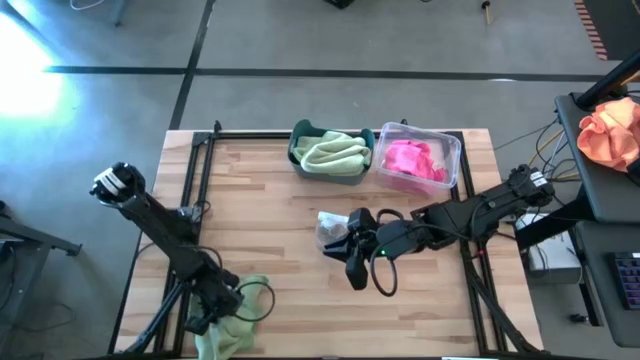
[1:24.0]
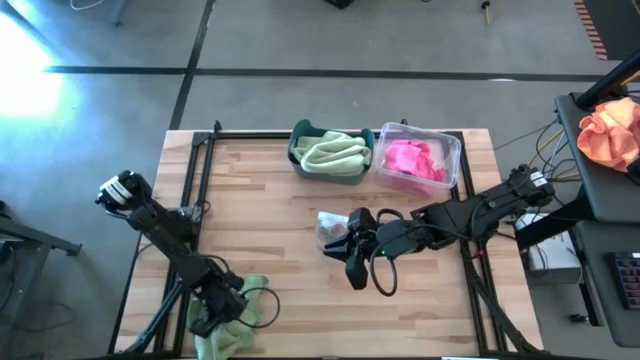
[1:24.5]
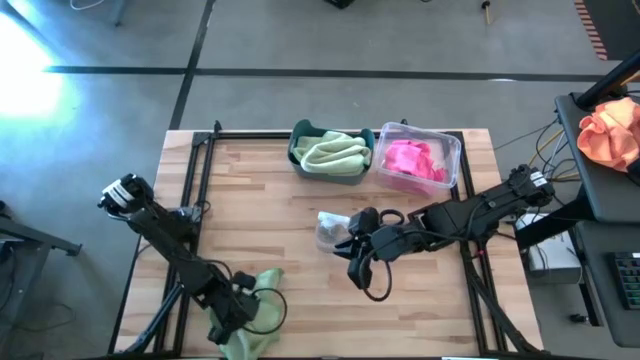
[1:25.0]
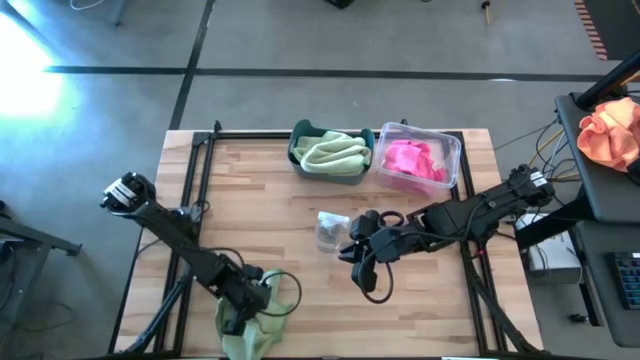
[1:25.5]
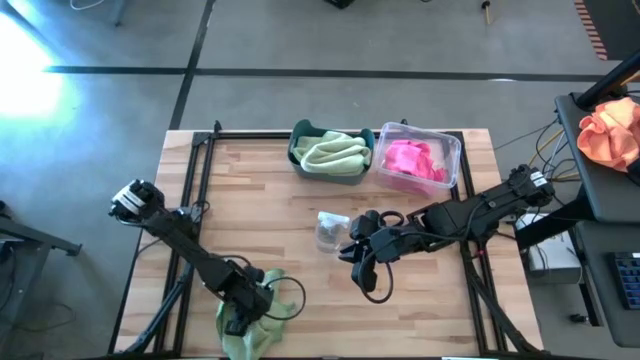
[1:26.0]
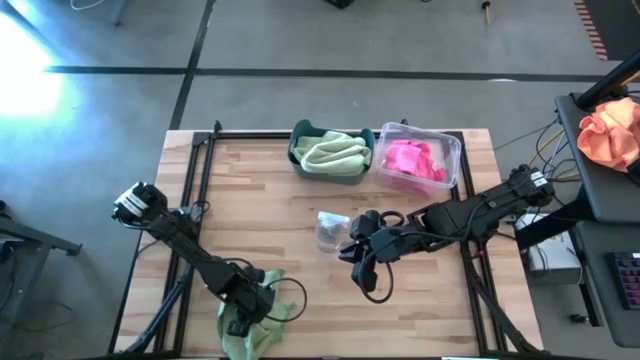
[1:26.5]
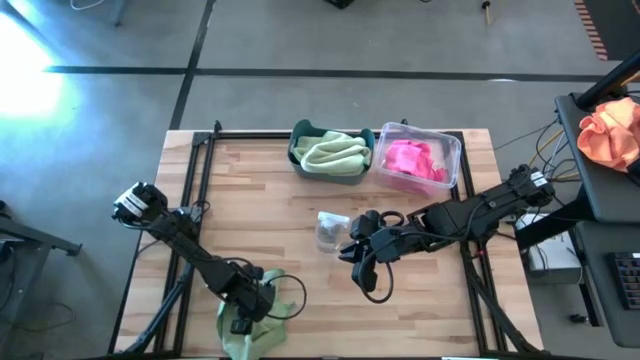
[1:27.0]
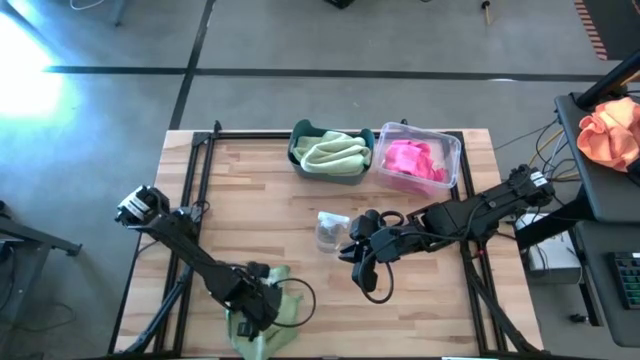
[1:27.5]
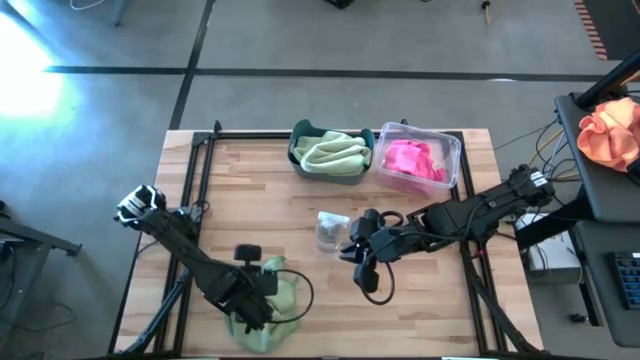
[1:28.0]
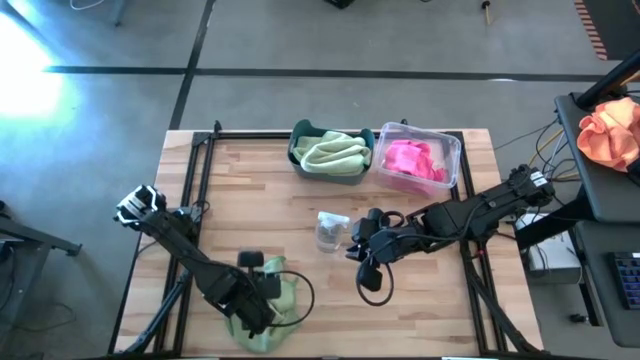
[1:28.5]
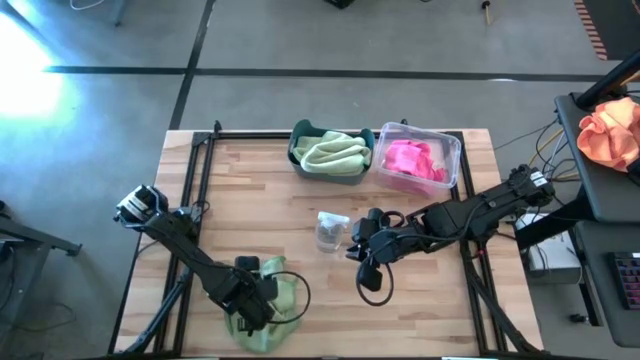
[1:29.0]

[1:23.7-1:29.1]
Task: Sort microfiber towel by color & place in baskets
Put the green microfiber cloth into the blue bin

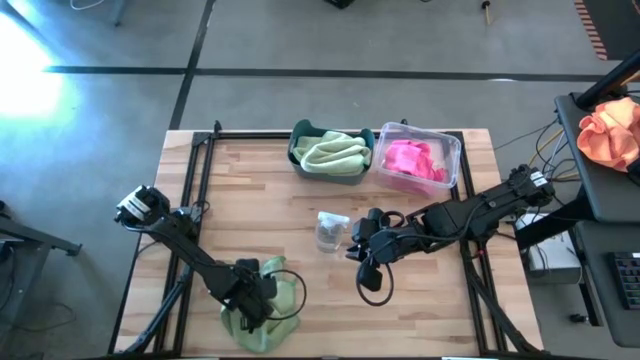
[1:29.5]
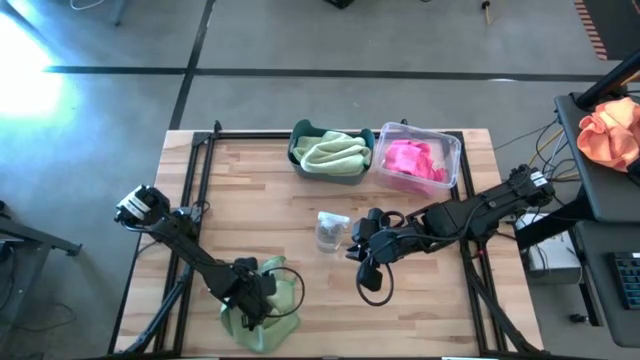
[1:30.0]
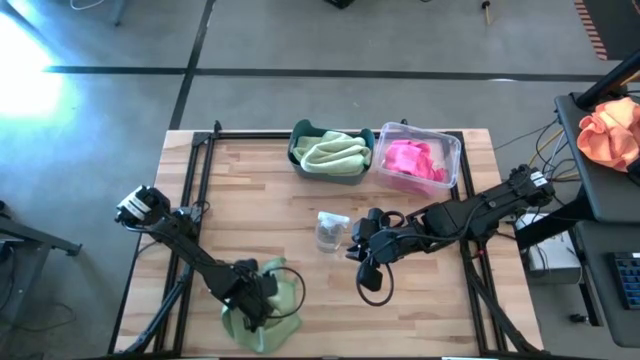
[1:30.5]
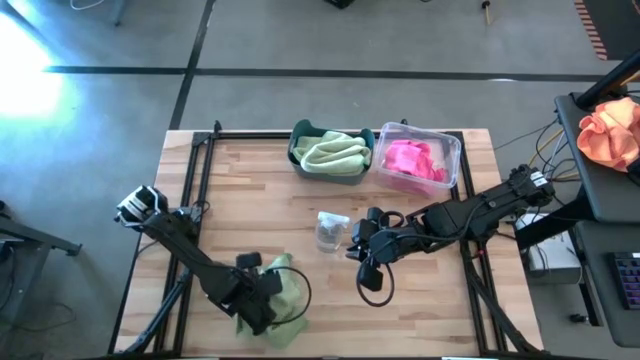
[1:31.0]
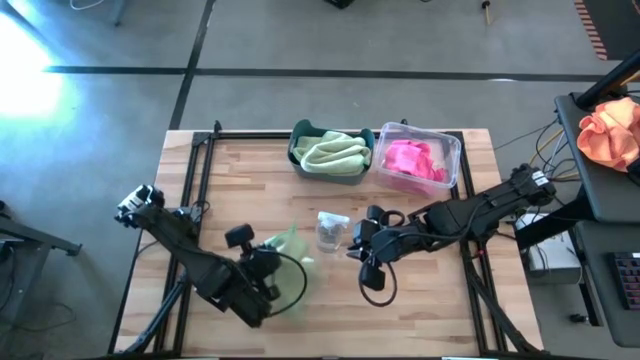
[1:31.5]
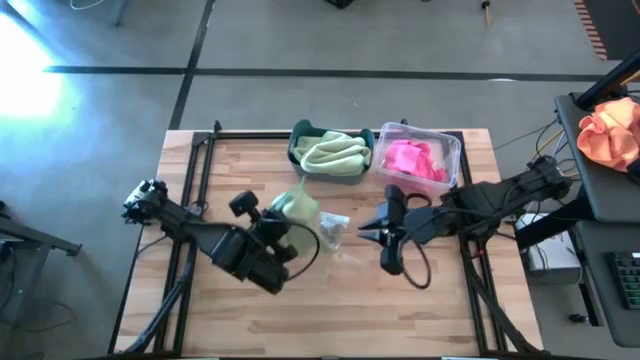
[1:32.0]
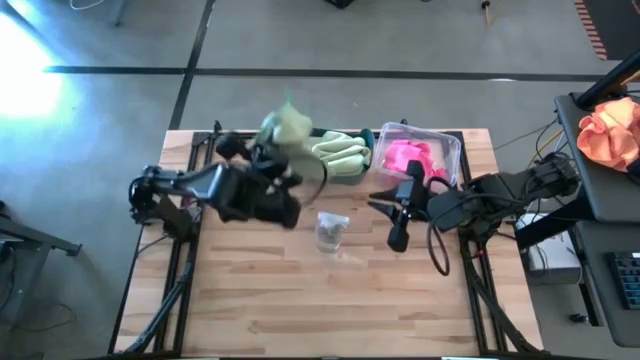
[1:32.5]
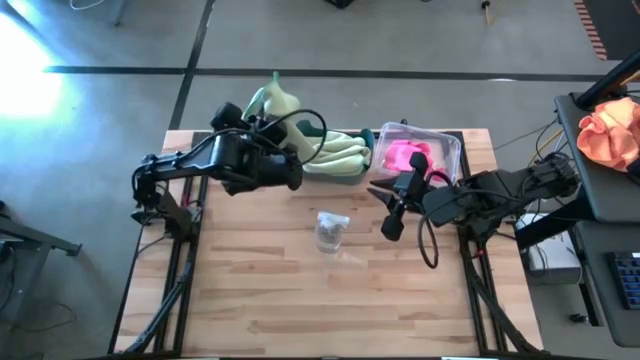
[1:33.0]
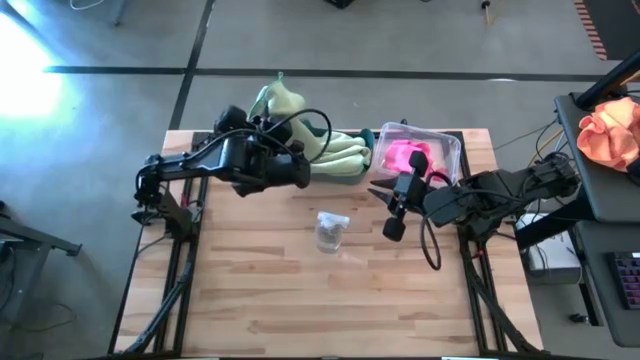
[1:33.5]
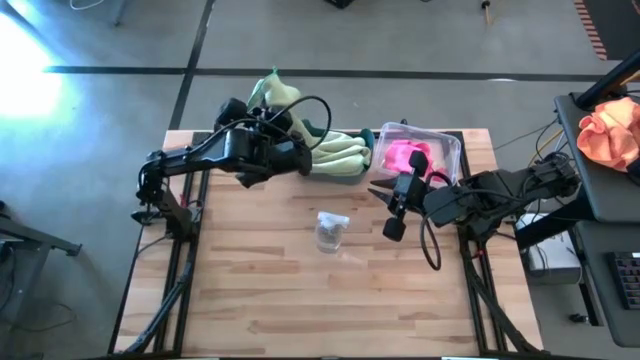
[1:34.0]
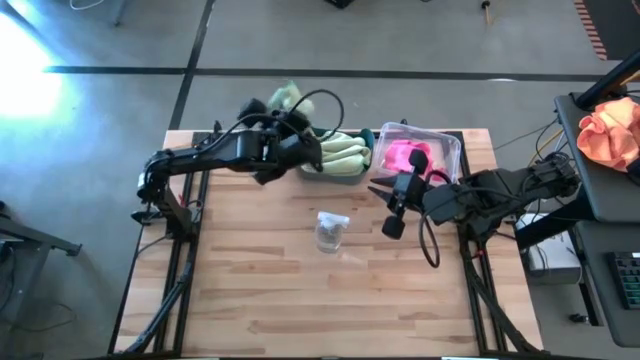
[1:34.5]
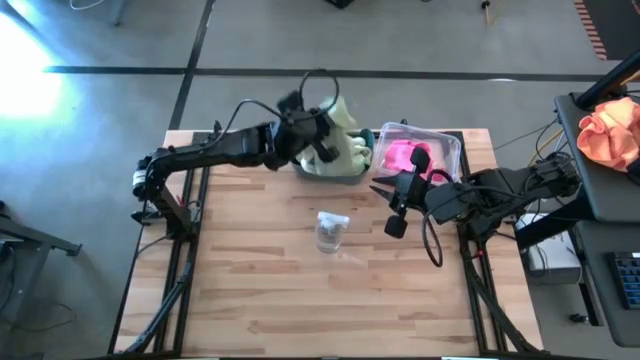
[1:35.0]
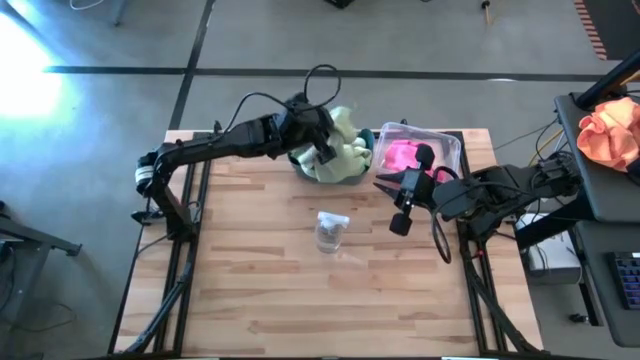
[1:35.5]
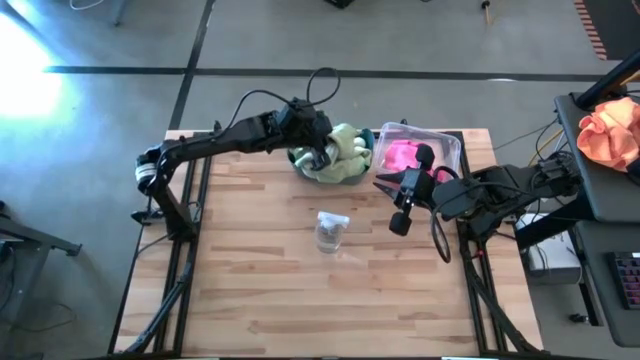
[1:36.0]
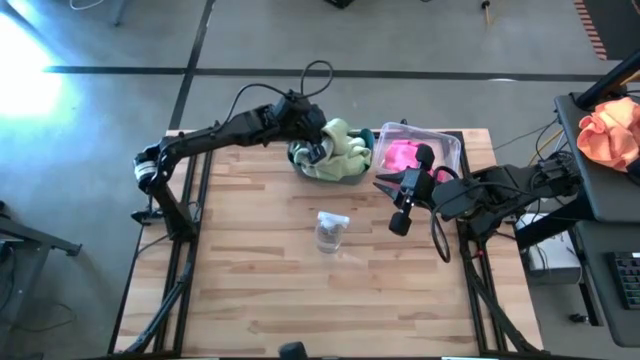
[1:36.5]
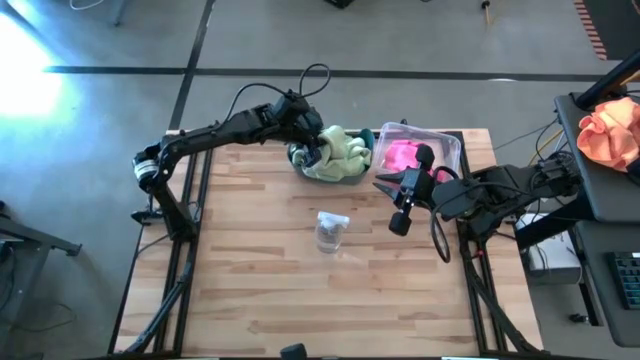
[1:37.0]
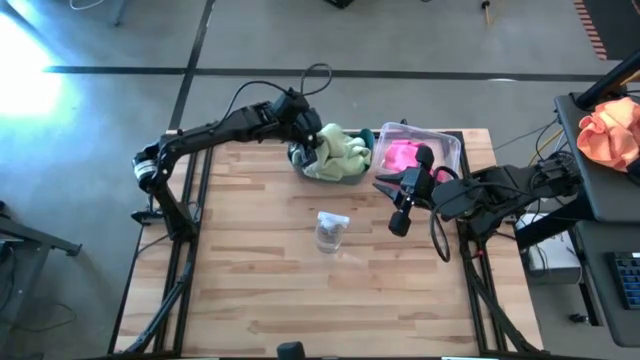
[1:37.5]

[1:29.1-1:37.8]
Put the green microfiber cloth into the blue bin

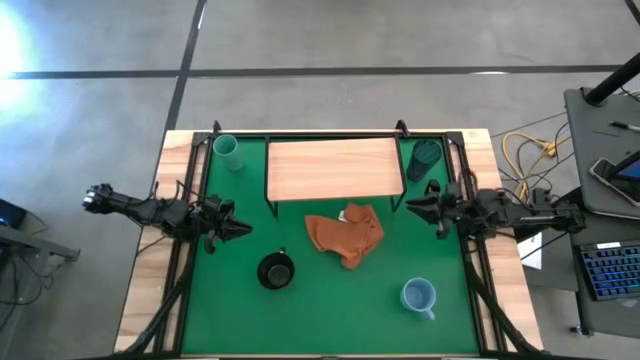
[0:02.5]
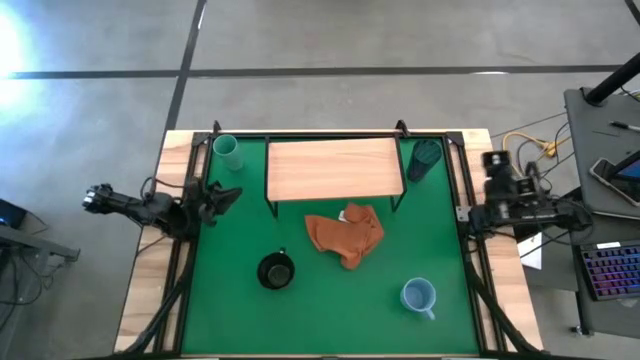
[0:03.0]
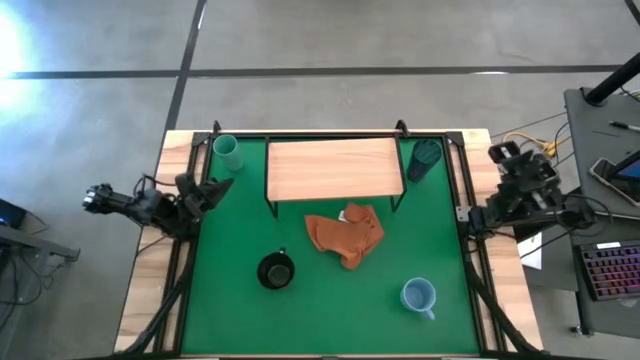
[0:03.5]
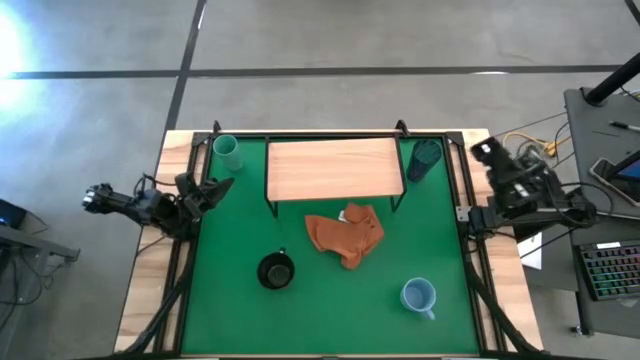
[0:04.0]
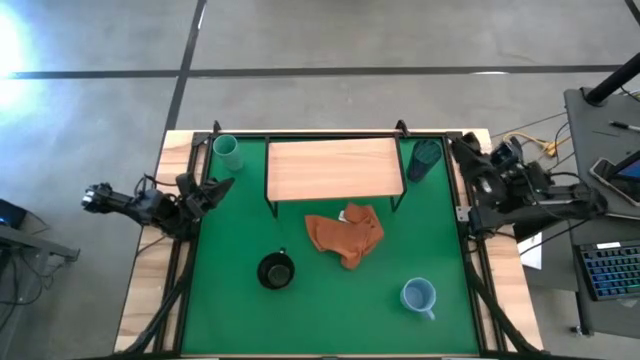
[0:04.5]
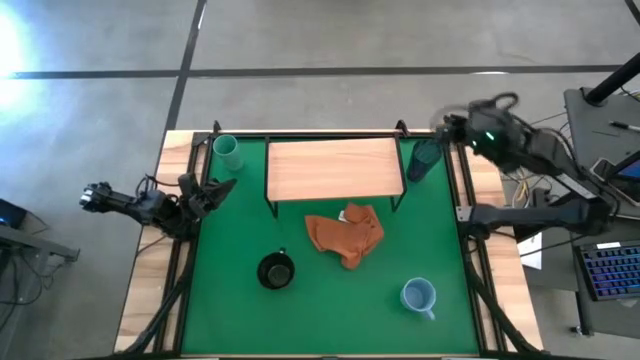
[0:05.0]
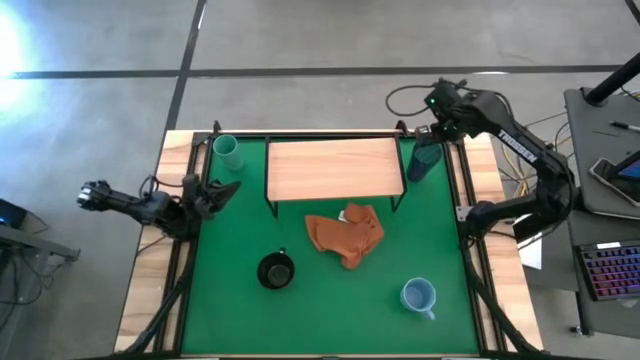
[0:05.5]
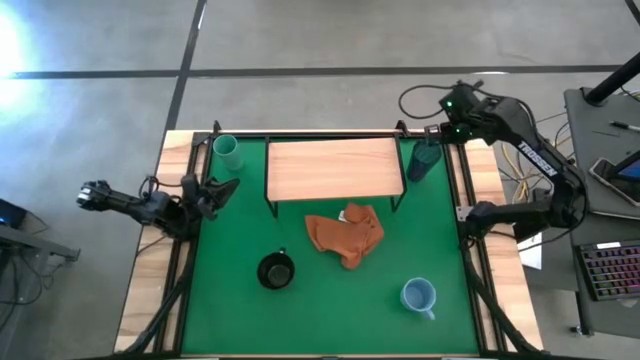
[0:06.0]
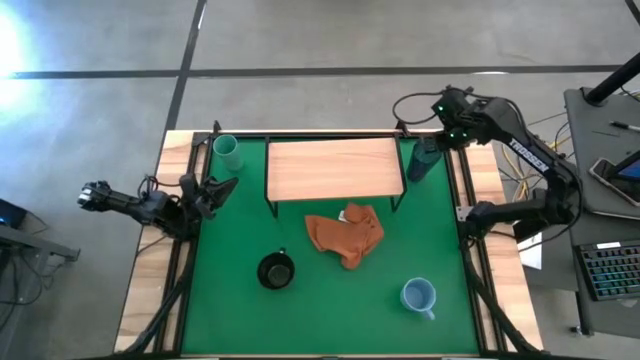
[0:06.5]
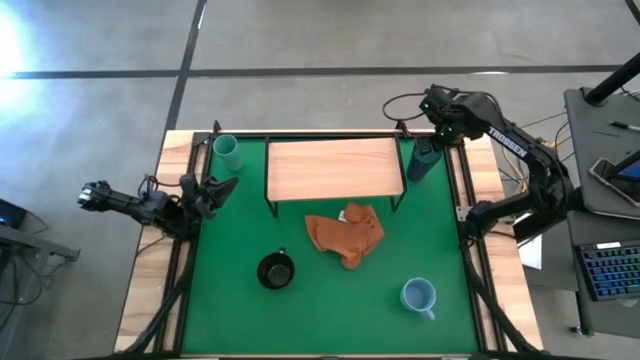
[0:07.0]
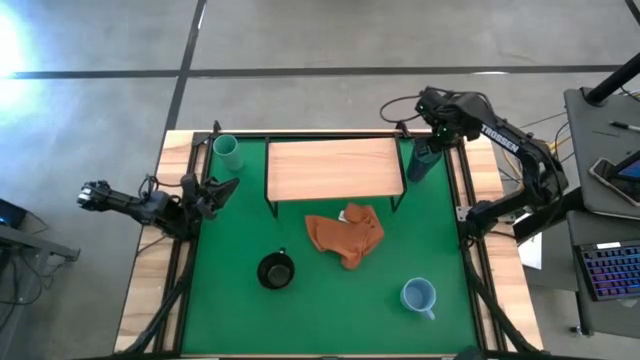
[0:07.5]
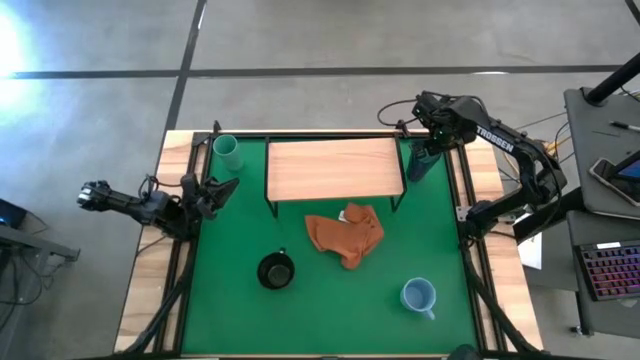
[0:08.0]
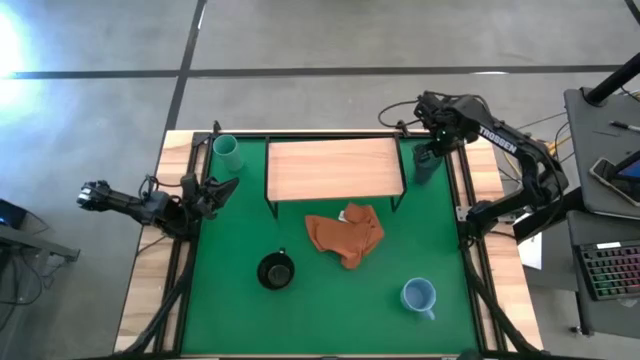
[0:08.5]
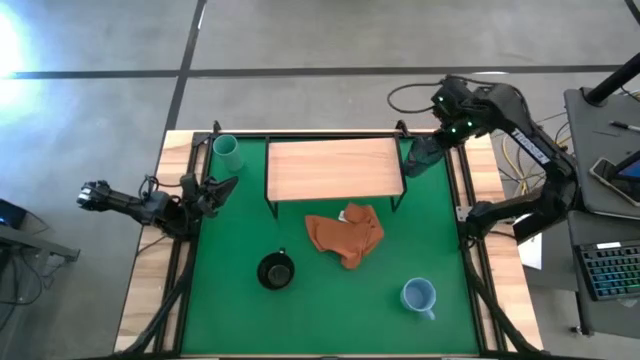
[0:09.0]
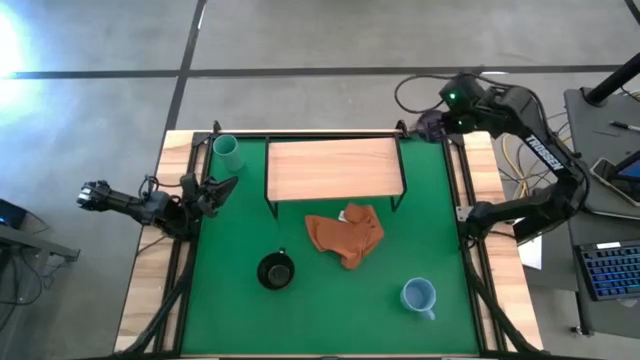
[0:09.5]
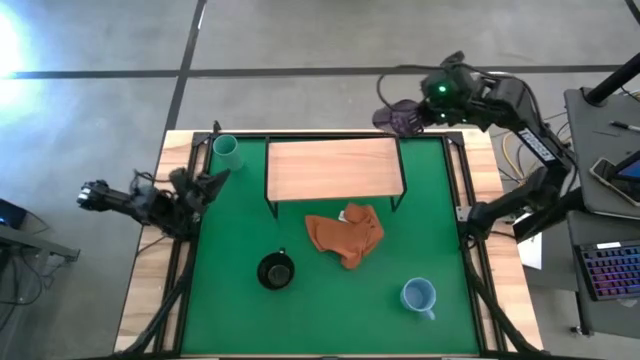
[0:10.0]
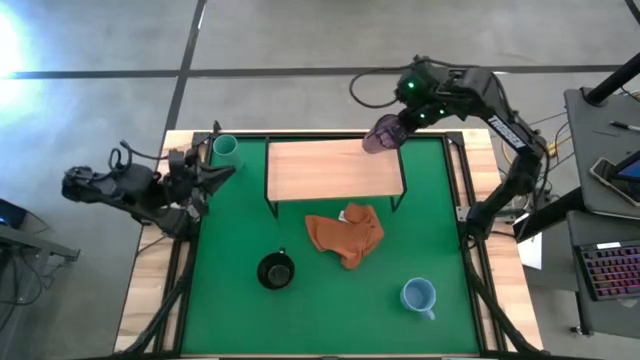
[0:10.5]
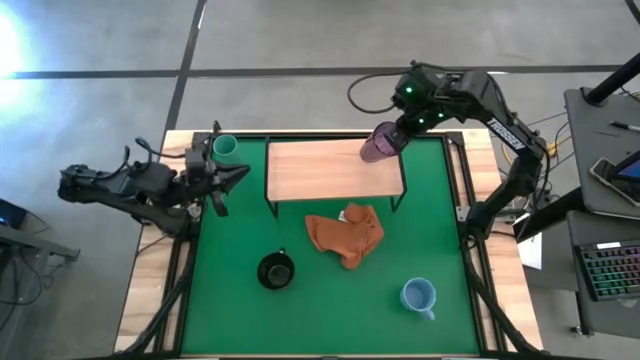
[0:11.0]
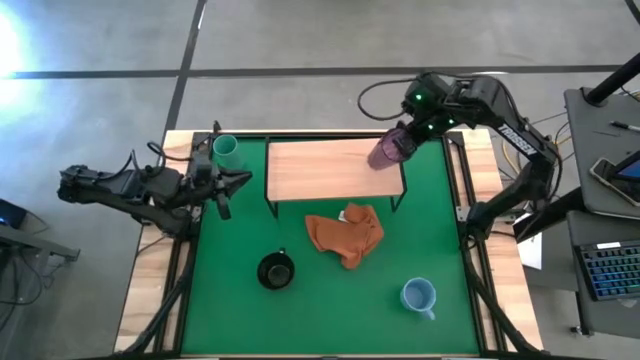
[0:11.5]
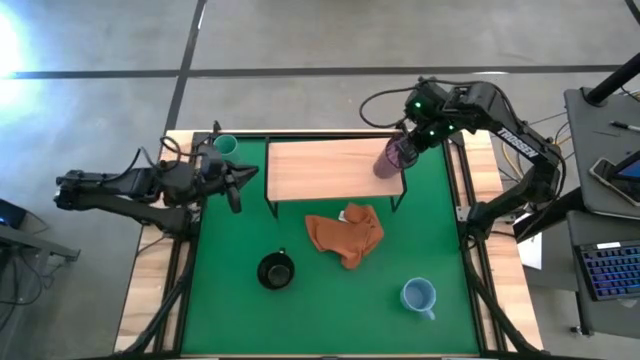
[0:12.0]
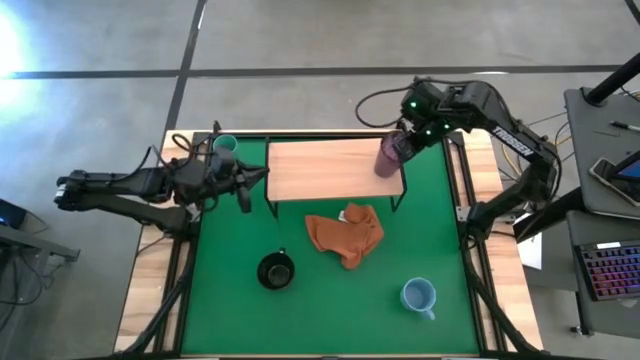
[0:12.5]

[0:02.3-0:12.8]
Task: Stack small to large cups/mugs on shelf
Put the violet cup on the shelf
